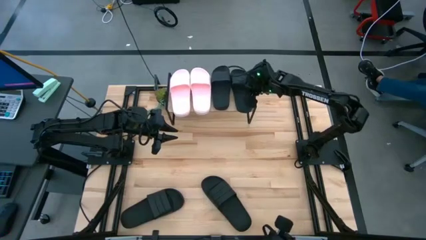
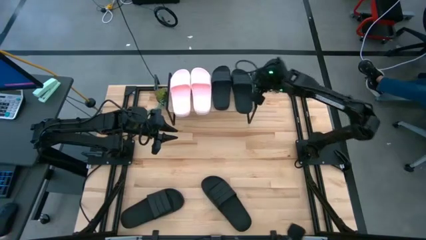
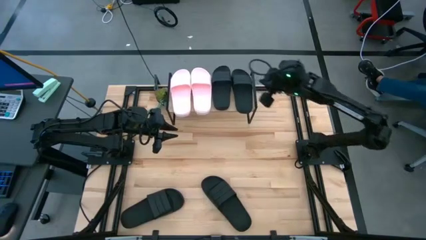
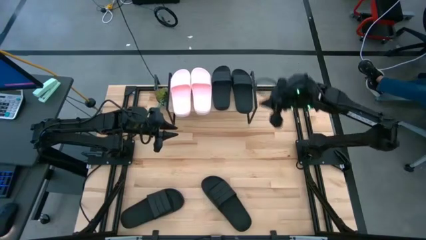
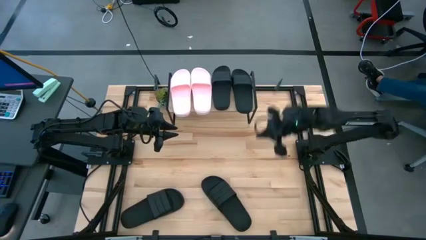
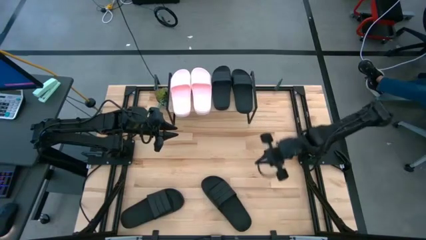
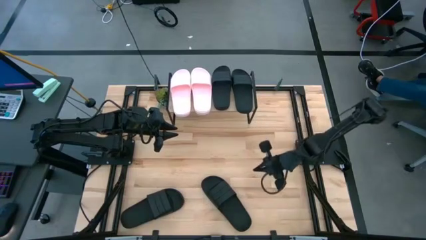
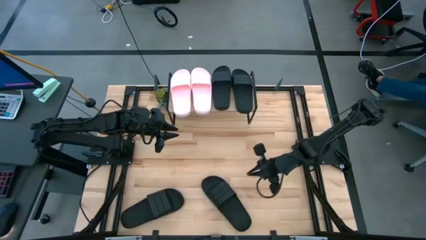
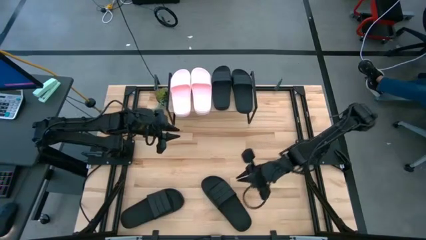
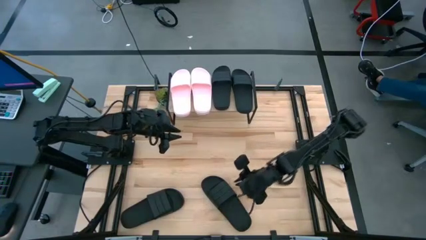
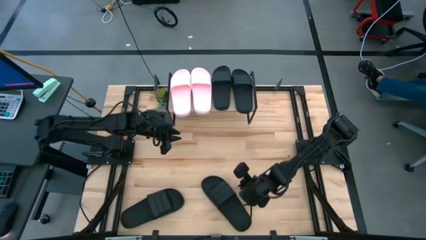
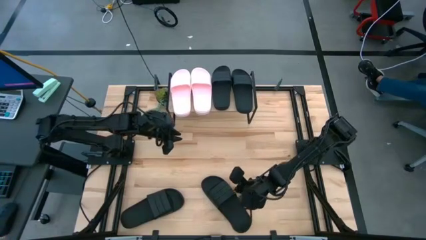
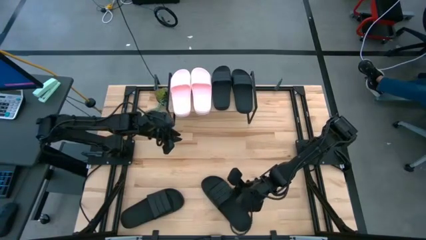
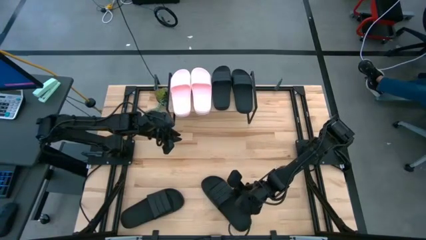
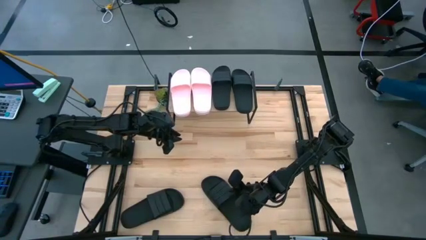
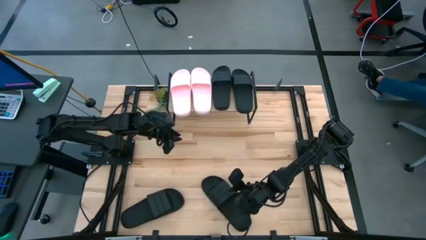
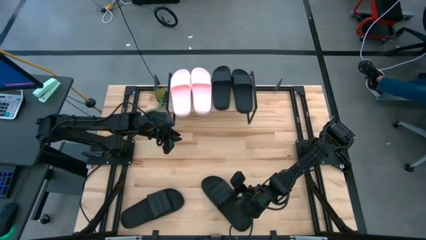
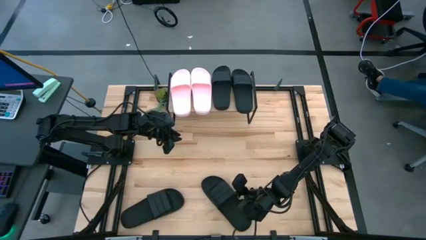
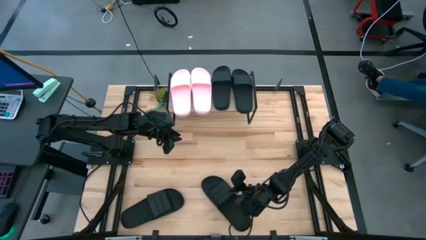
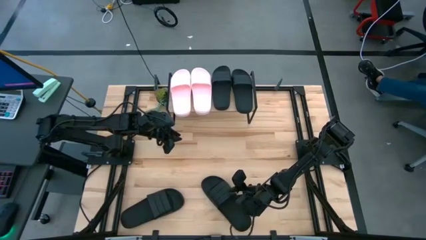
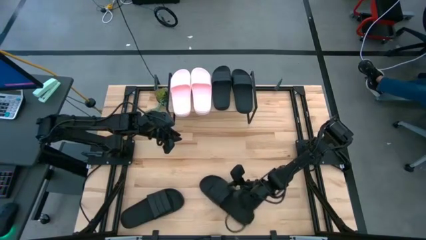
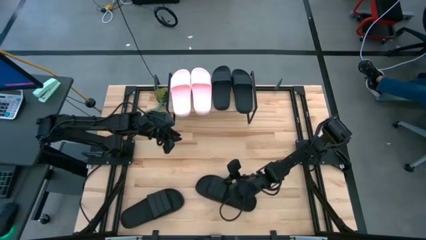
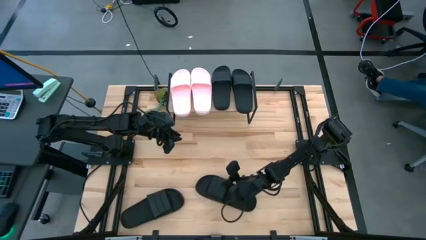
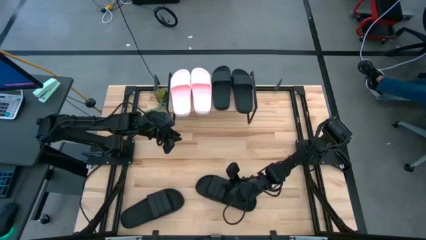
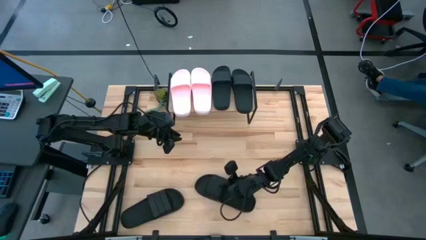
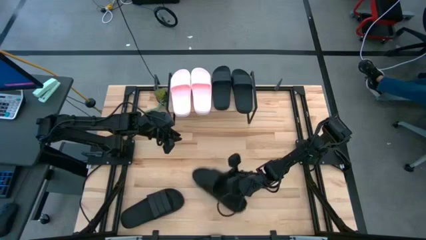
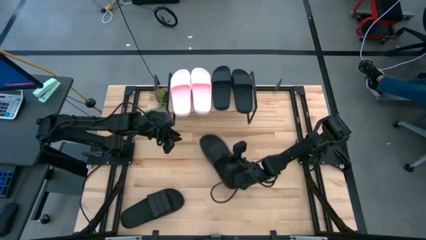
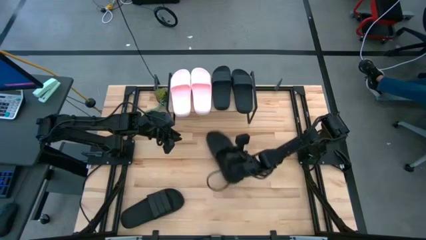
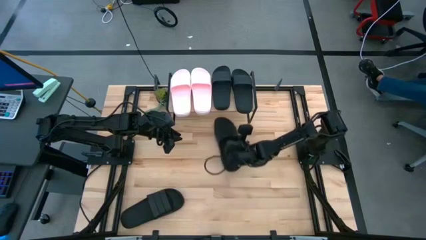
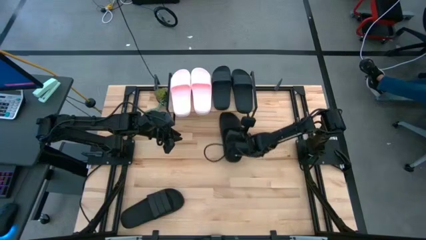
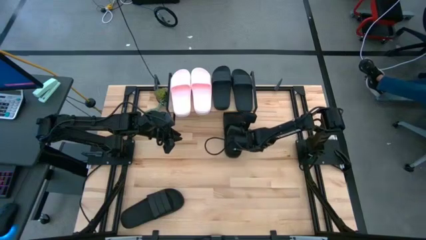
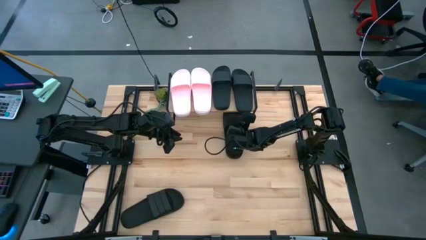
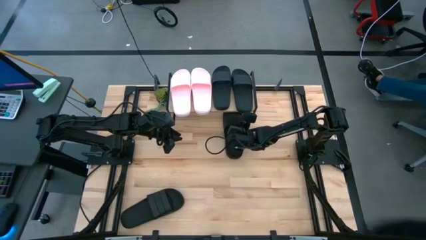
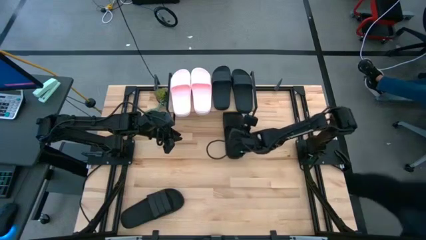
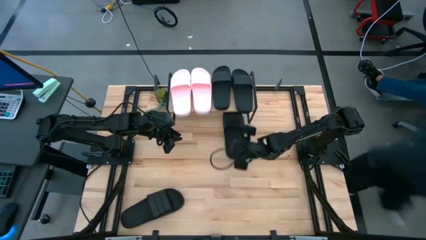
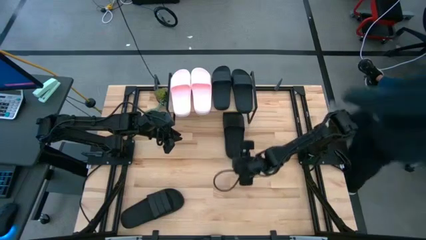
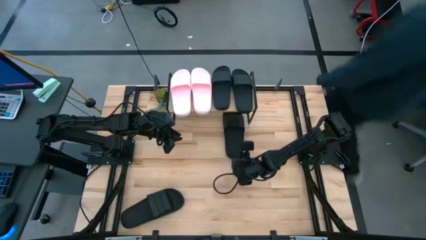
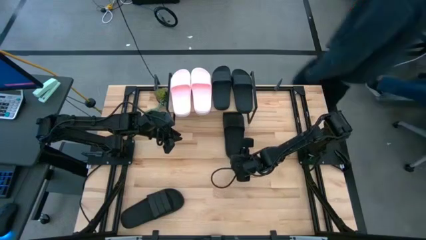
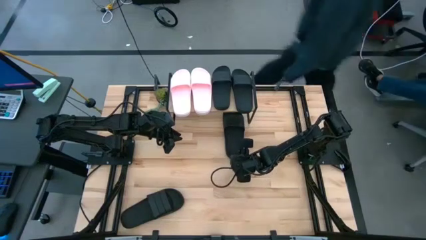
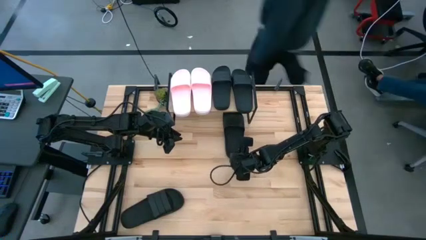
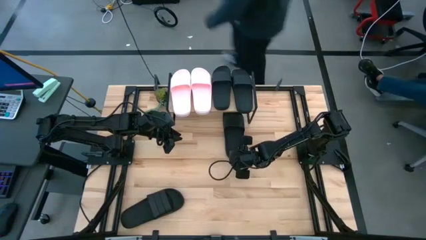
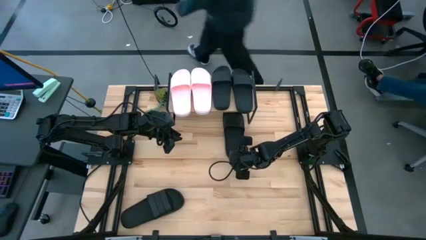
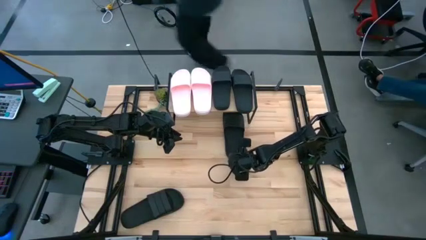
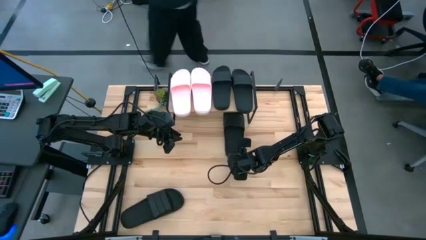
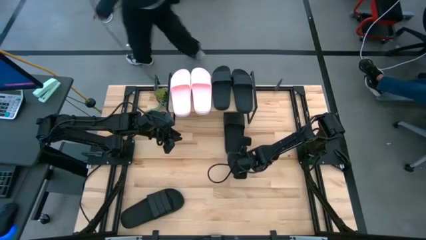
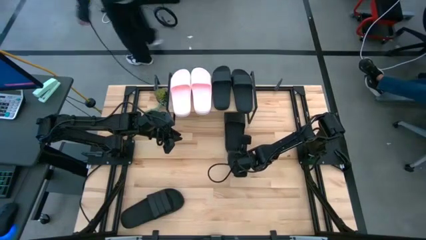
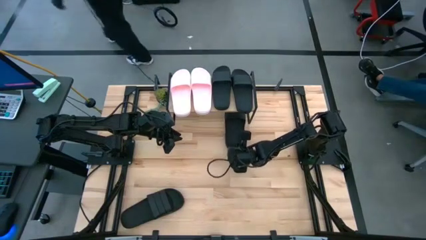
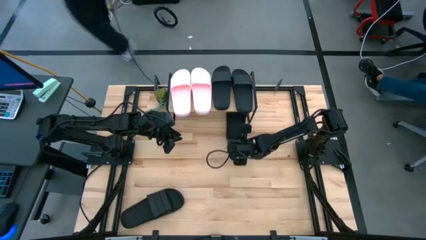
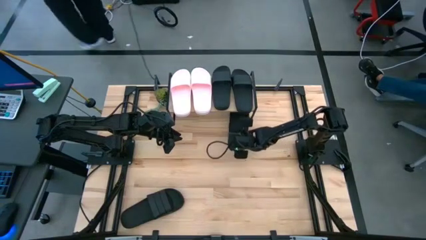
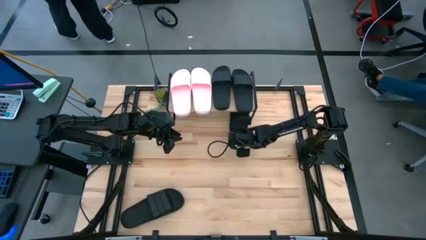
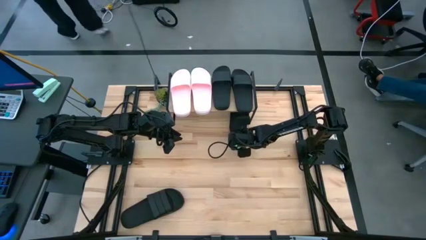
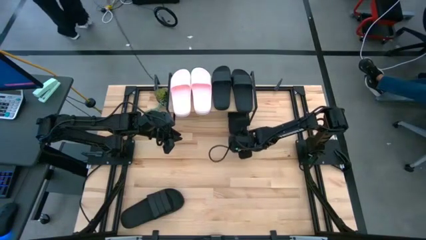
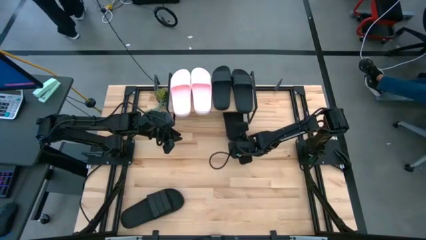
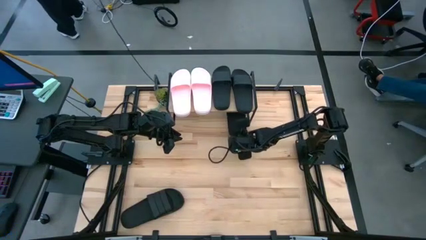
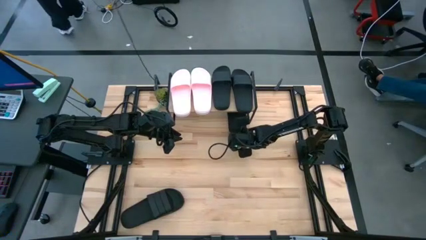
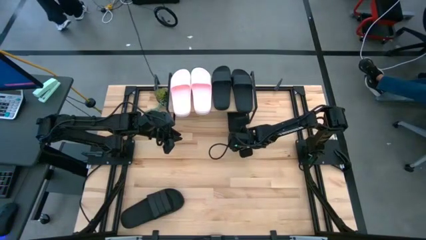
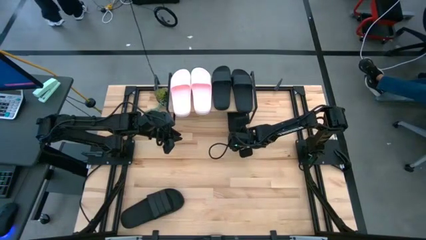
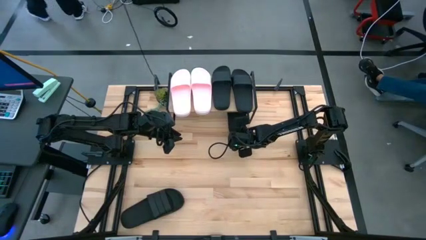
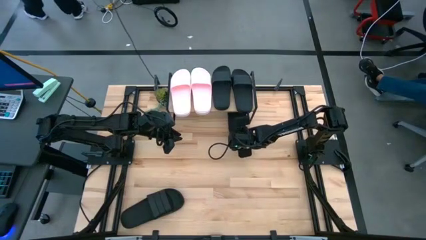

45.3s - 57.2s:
Task: Pick and place slides into the shelf
Put the middle right black slide under the shelf
